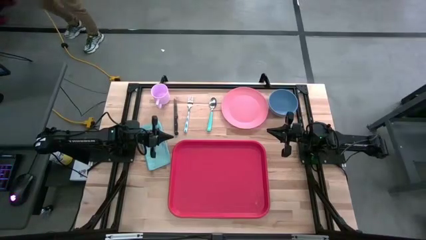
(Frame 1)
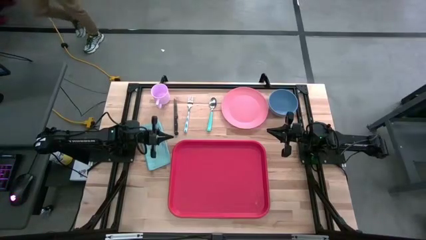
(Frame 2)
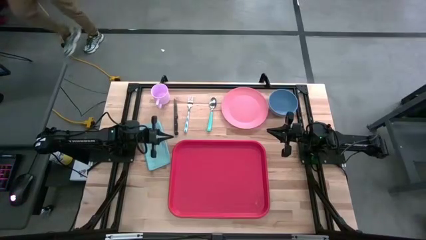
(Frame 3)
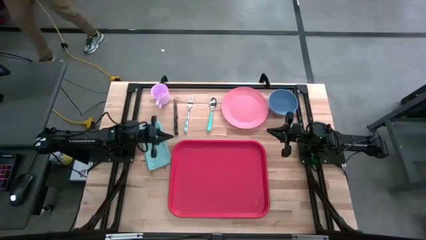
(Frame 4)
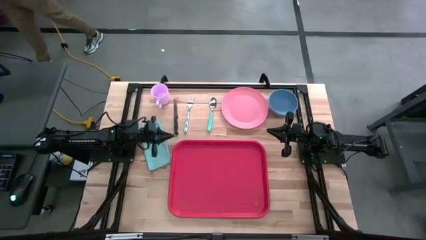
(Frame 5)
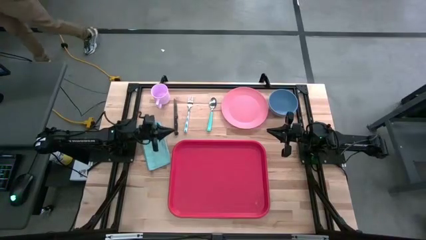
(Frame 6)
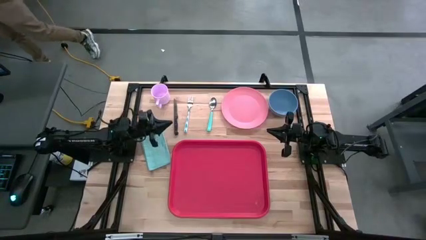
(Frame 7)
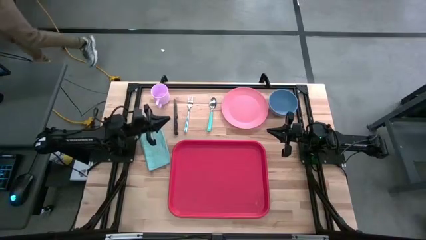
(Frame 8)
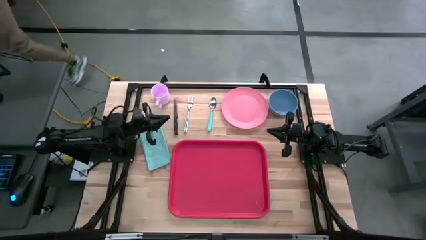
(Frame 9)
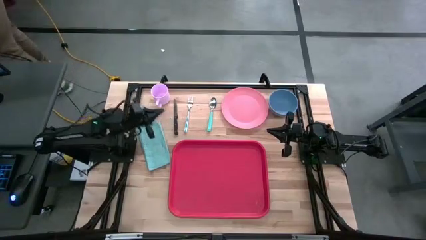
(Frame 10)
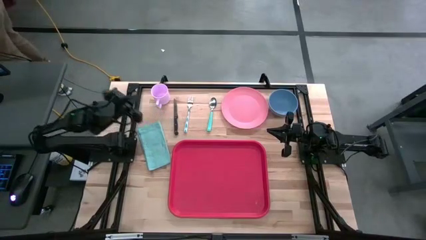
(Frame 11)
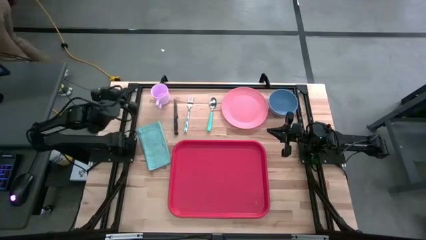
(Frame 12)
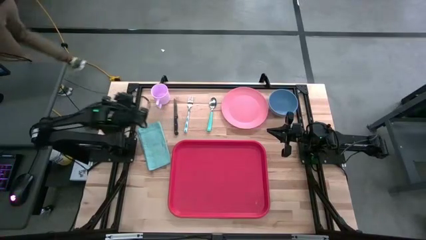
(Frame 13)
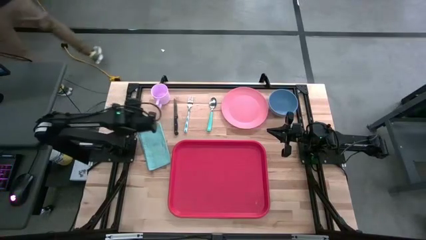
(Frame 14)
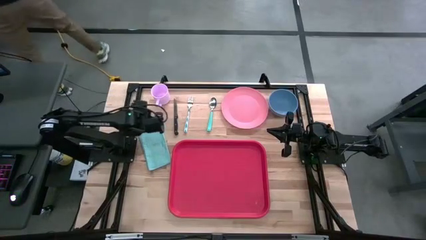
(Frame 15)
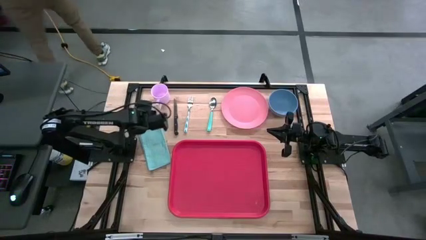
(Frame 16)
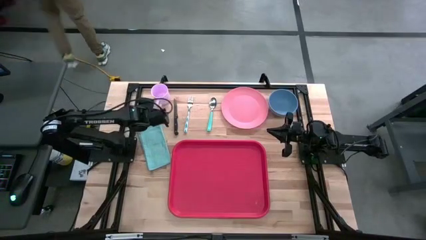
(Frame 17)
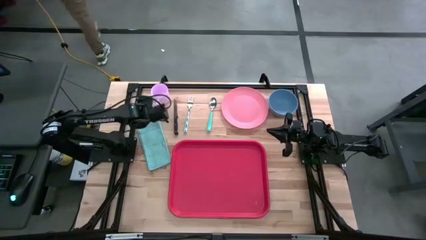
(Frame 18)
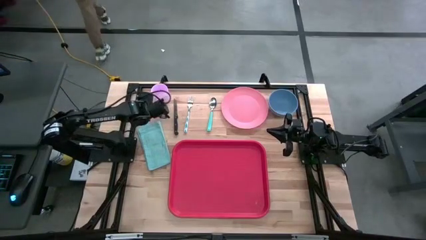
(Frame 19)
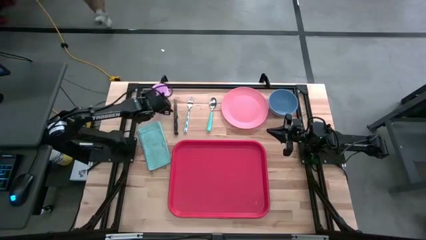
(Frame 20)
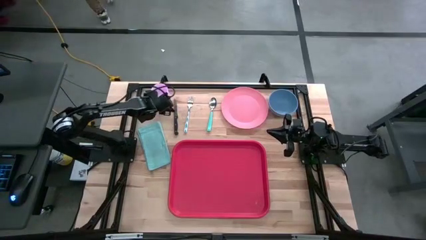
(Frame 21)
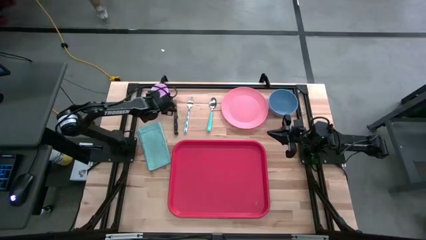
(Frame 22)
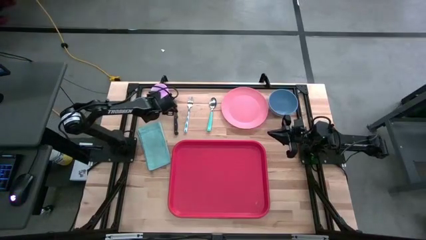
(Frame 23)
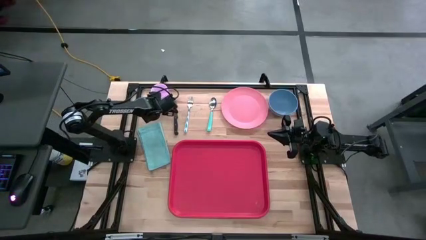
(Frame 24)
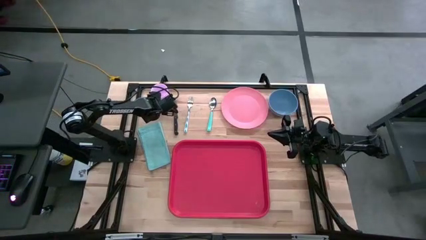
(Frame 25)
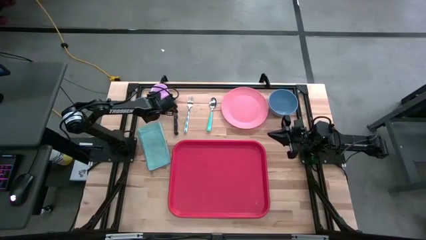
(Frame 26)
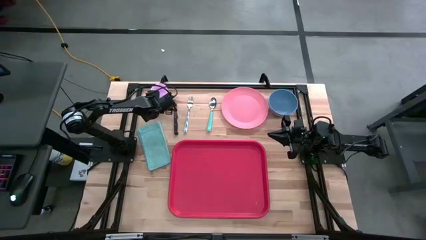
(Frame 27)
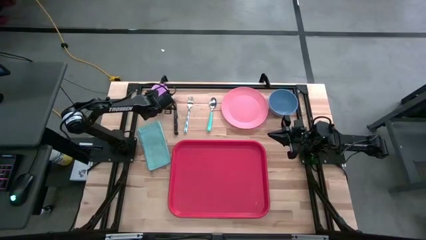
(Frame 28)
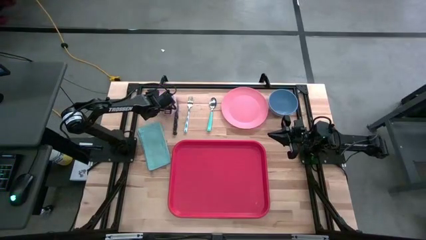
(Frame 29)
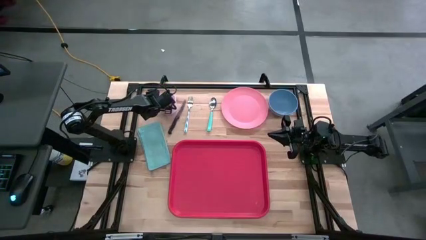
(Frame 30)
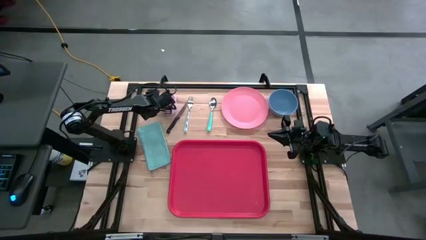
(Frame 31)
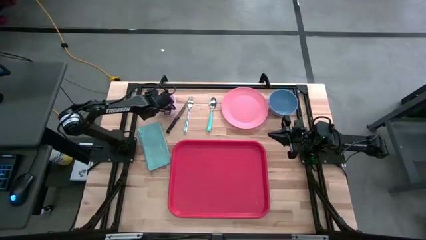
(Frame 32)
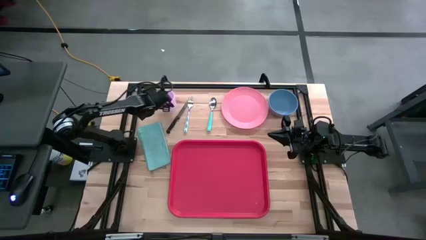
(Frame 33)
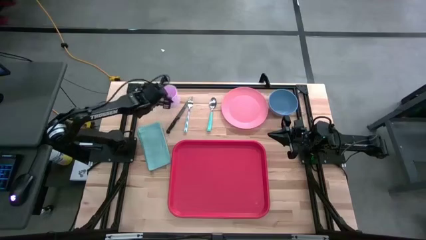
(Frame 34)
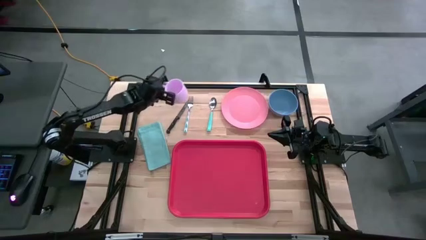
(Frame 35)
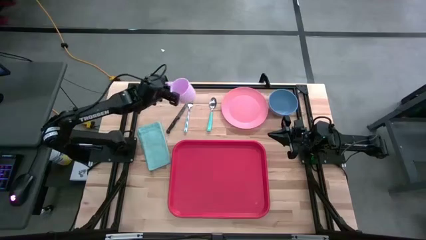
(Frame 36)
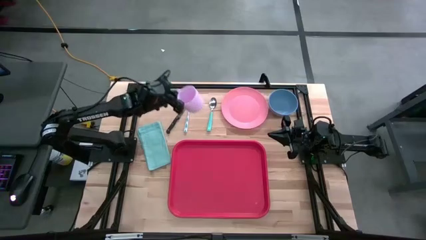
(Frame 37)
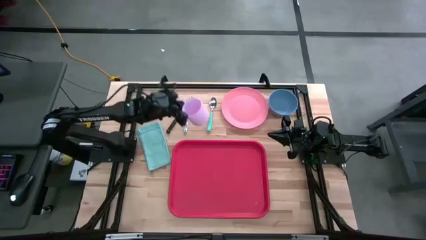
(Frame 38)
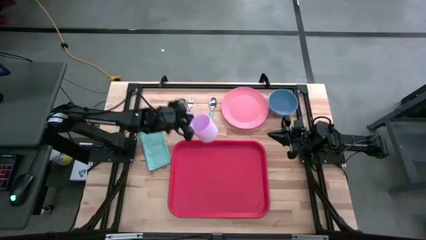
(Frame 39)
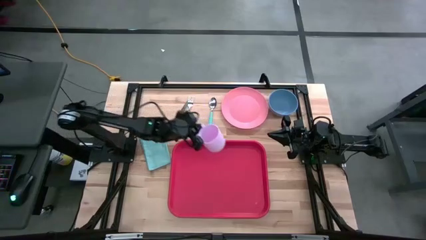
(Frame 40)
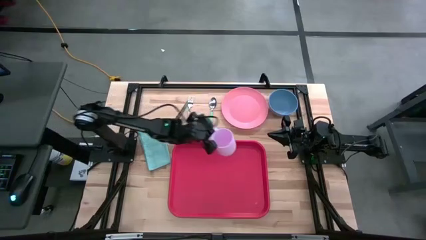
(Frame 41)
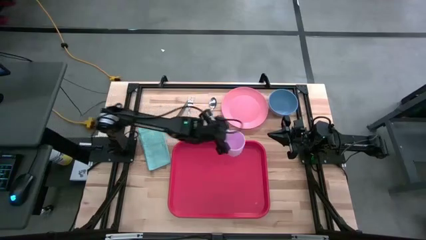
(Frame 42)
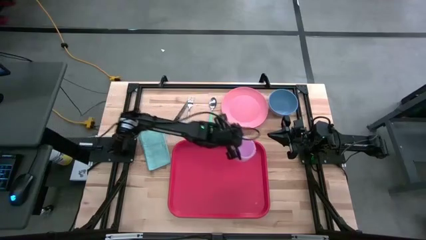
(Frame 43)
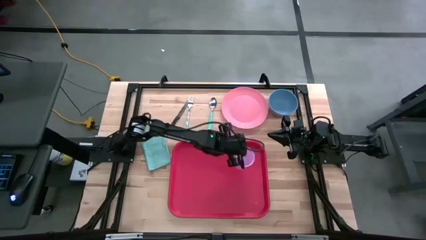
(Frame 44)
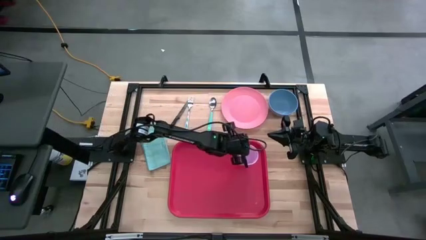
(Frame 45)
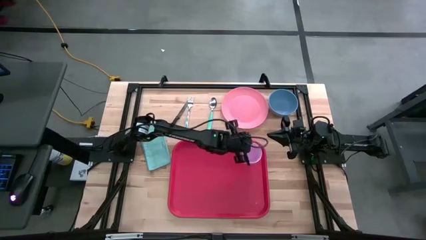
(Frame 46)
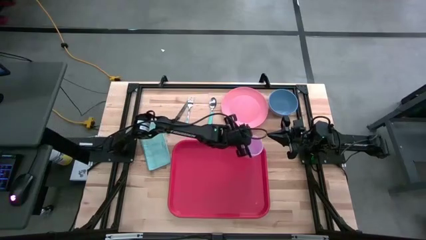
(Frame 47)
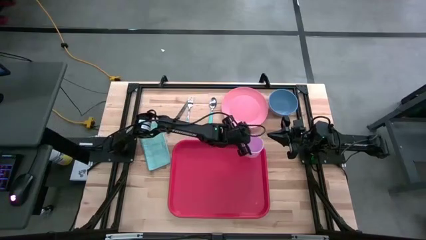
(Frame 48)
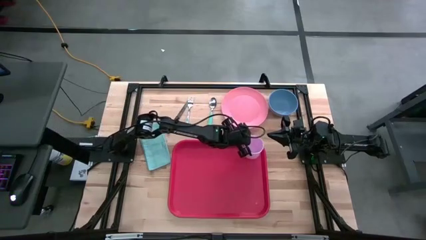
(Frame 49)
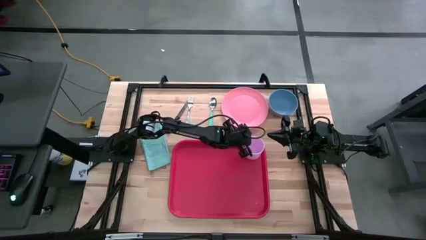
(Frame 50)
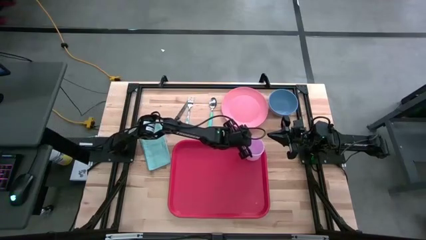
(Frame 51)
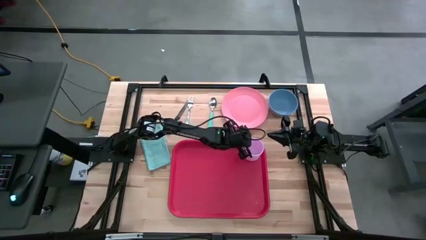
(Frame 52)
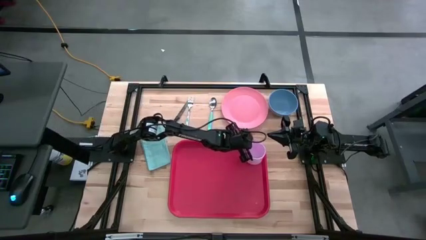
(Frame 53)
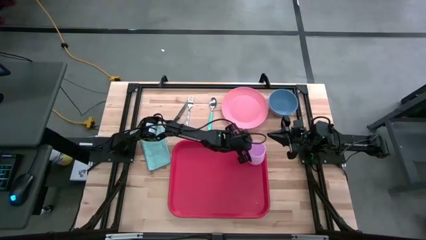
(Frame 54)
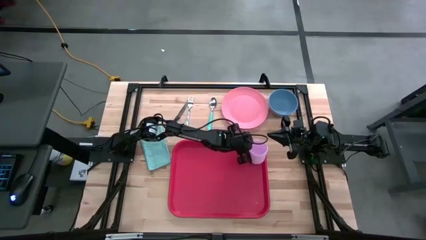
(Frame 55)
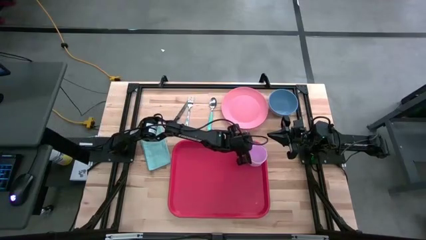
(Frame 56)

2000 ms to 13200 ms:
Task: Set up tray
Put the purple mug on the red tray

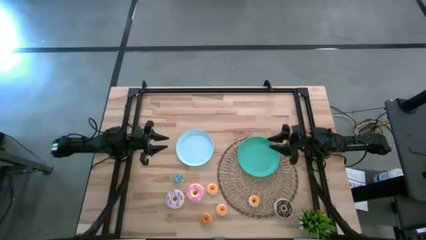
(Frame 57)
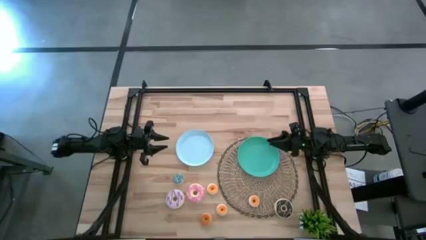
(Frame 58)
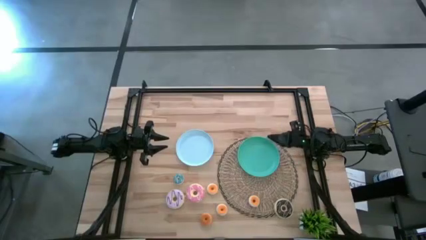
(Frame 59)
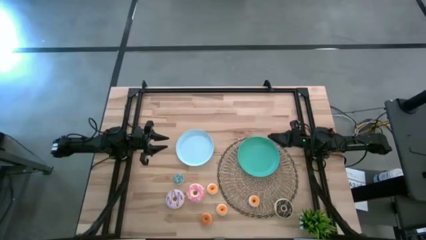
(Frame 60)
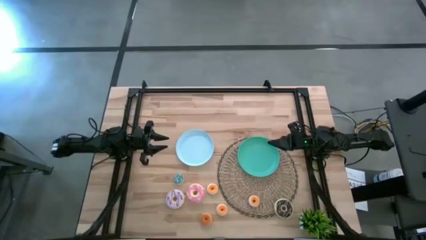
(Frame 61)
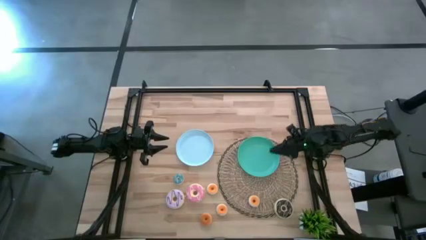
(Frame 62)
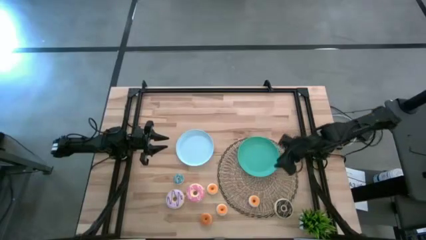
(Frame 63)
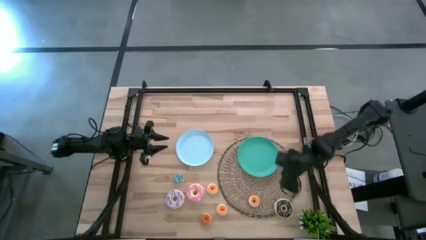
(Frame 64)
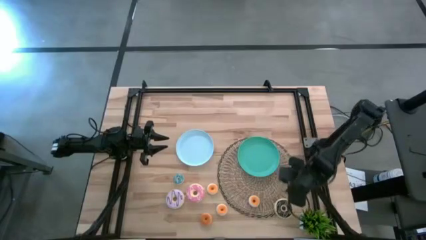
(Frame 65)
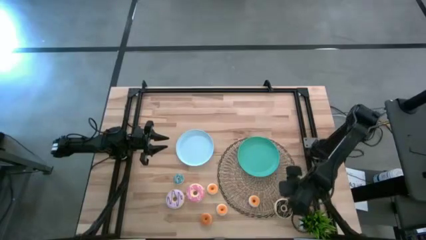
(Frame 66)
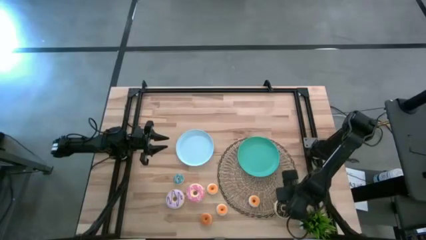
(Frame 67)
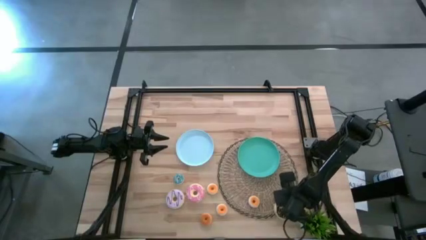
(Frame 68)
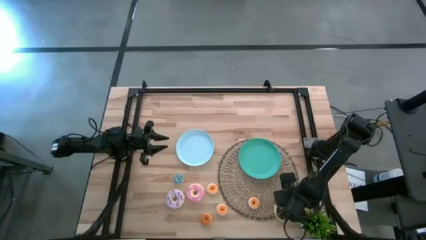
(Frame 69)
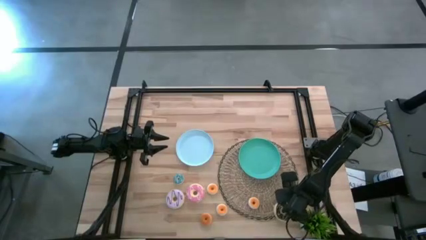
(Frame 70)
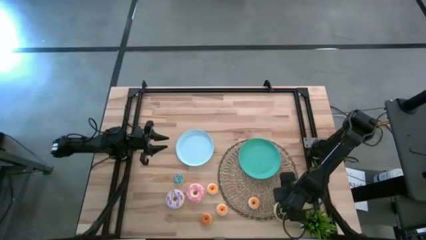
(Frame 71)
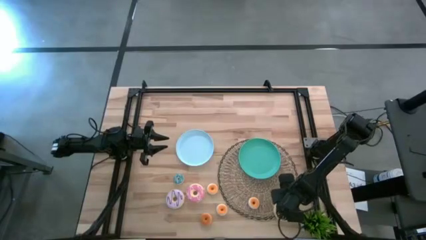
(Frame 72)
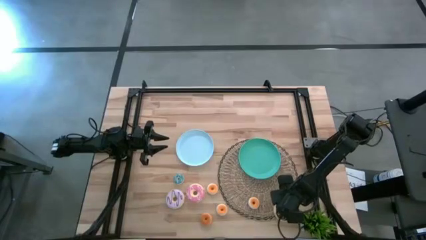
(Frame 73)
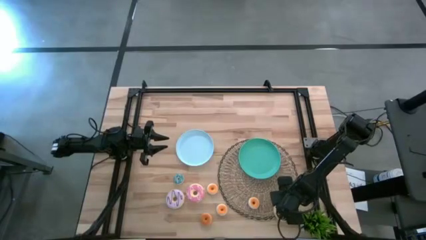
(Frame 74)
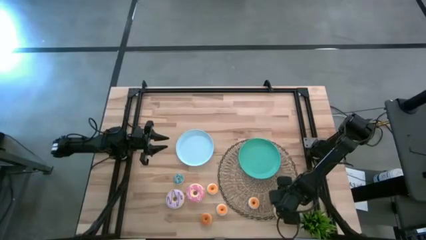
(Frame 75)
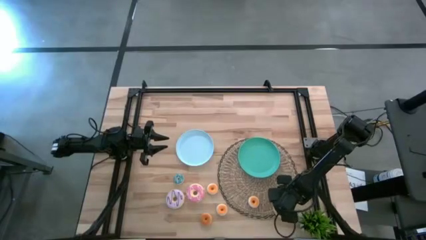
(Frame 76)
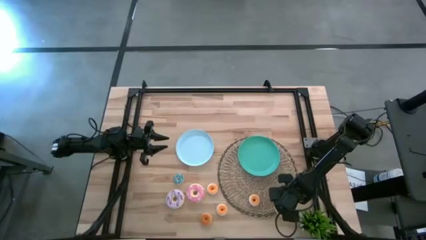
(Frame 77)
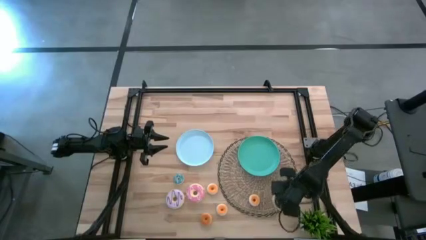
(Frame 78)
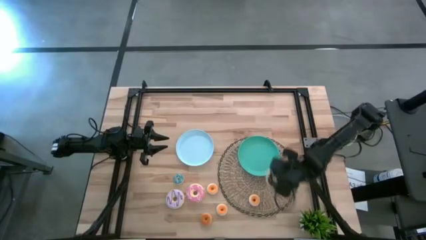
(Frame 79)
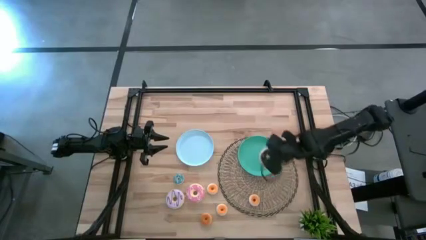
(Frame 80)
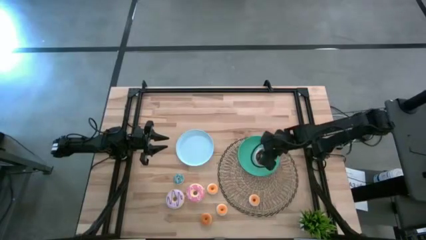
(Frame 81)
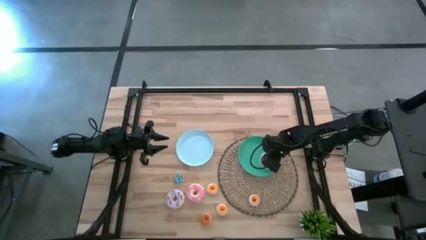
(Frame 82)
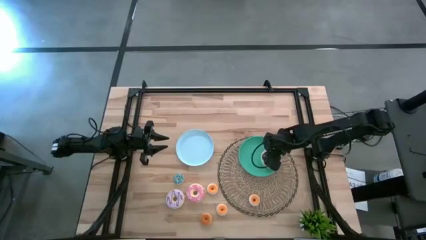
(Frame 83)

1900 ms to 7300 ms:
Task: Pick & Place donuts
Put the large black donut onto the green plate
